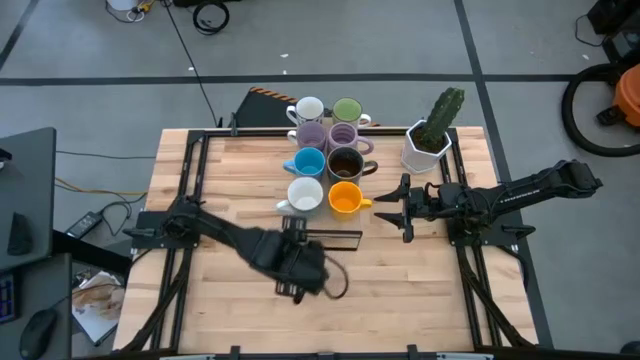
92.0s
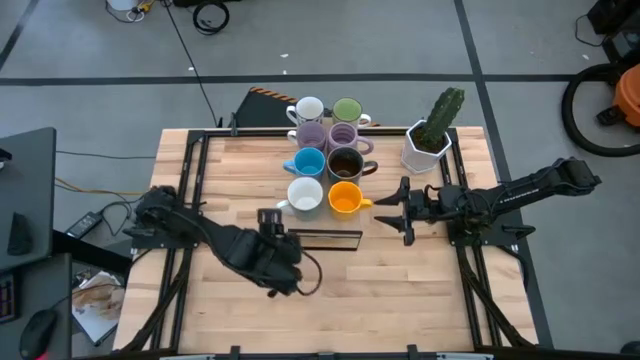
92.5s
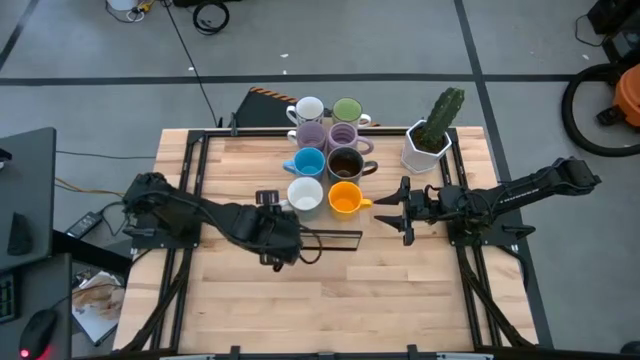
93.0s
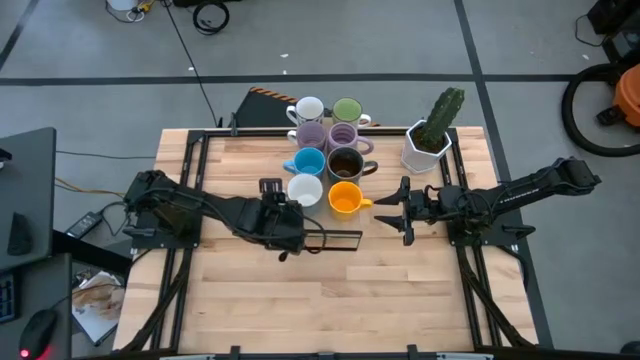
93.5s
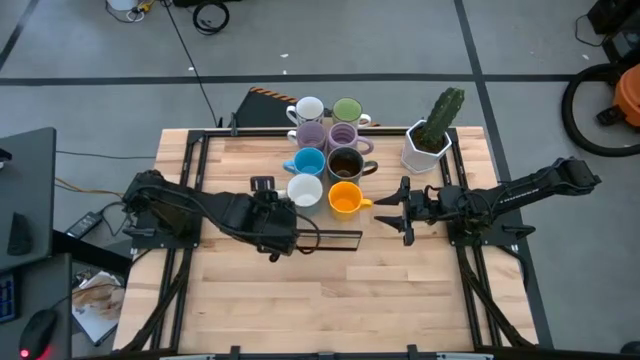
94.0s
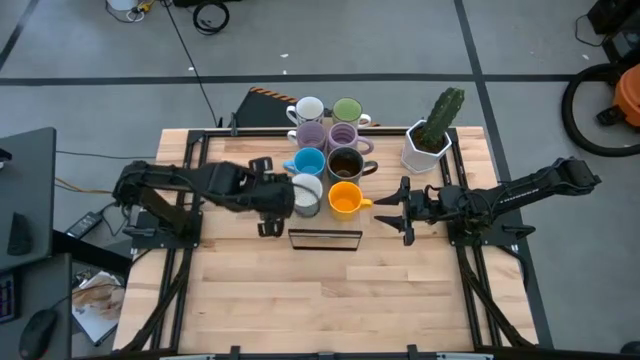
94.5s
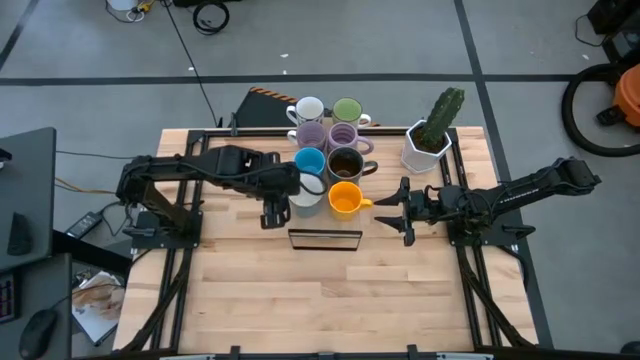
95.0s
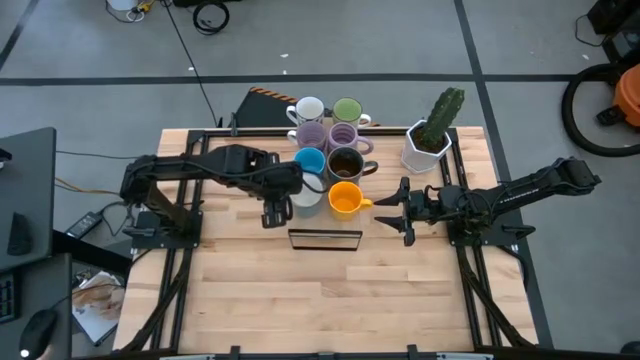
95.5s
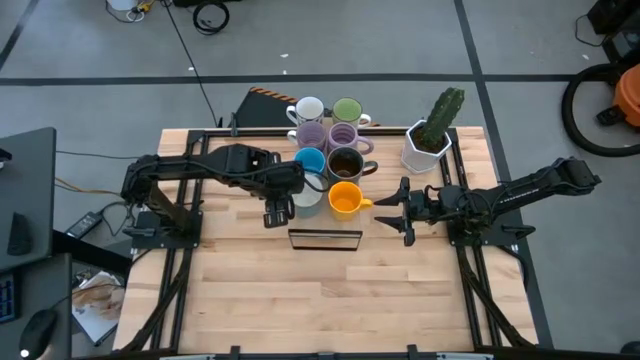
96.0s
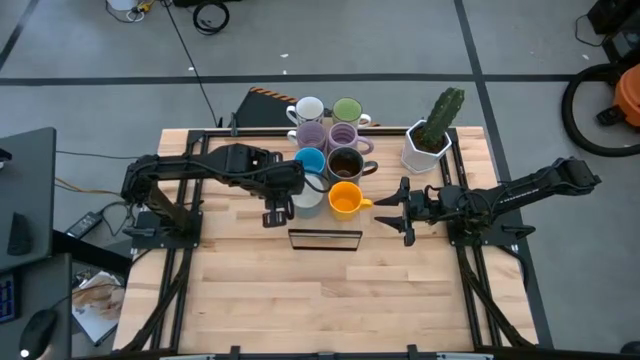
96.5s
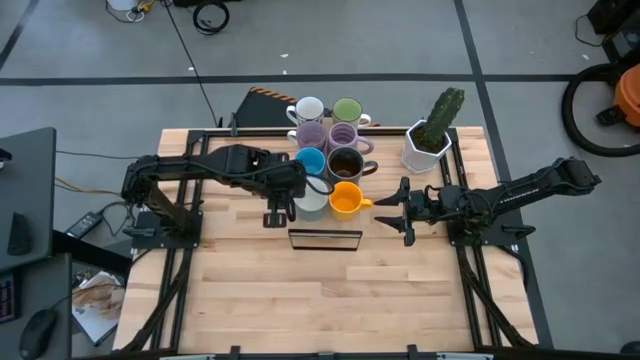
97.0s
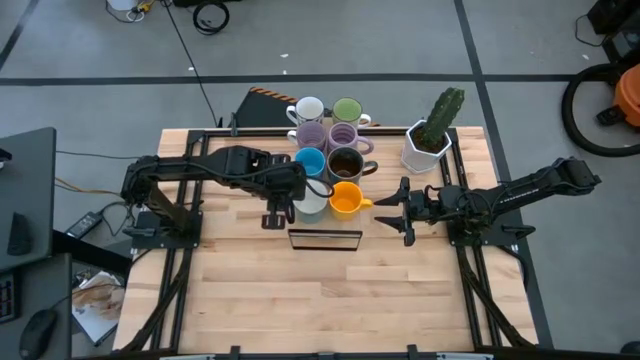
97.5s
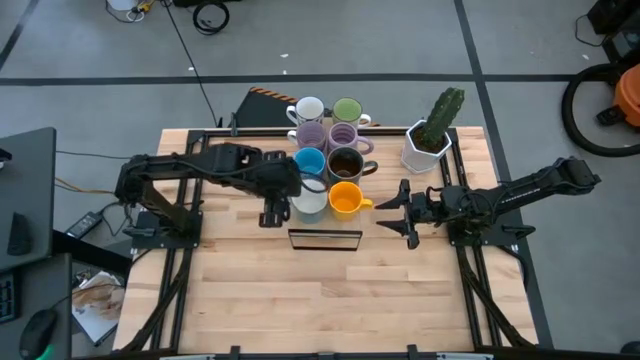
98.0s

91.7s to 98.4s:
Task: Place coffee mugs
Adjust the light green mug on the shelf

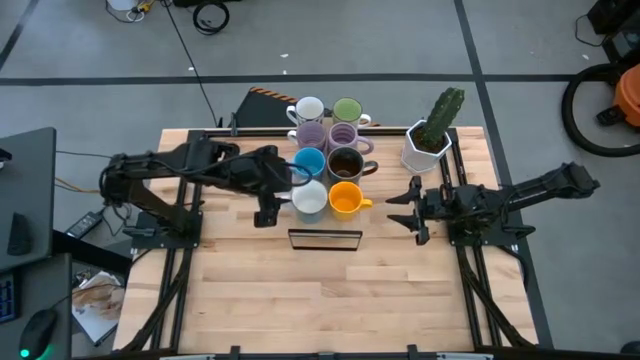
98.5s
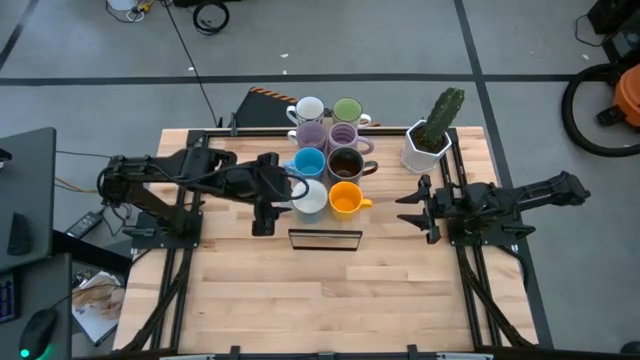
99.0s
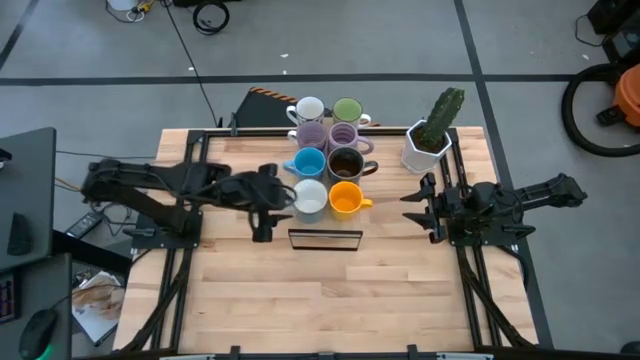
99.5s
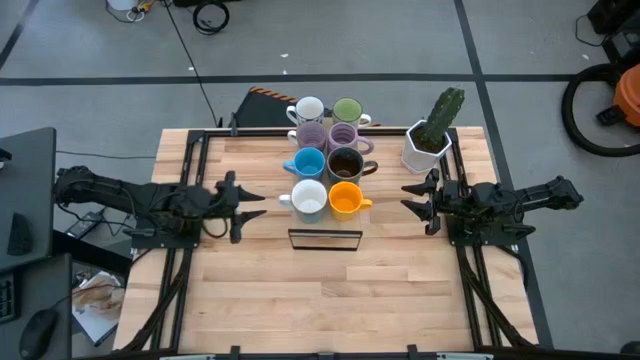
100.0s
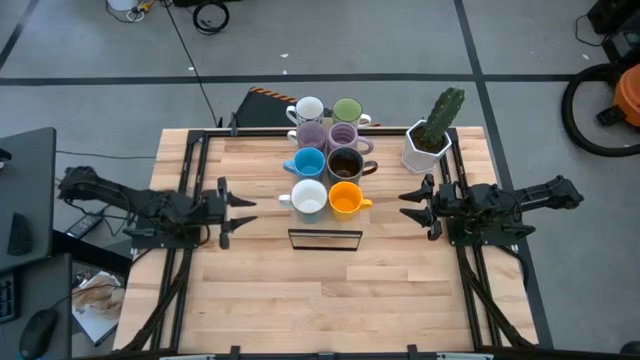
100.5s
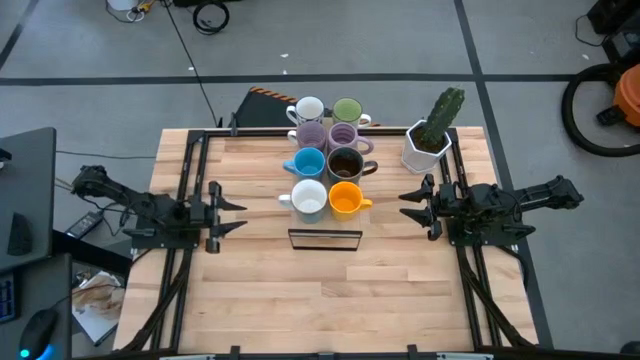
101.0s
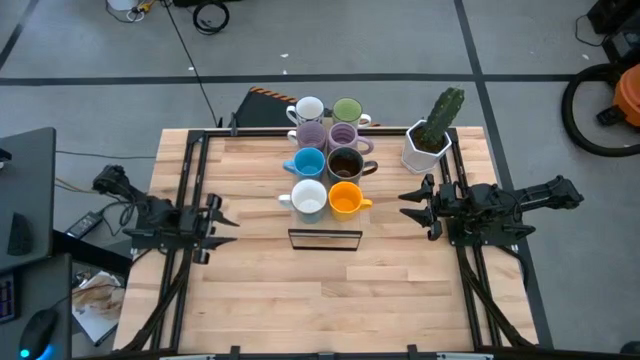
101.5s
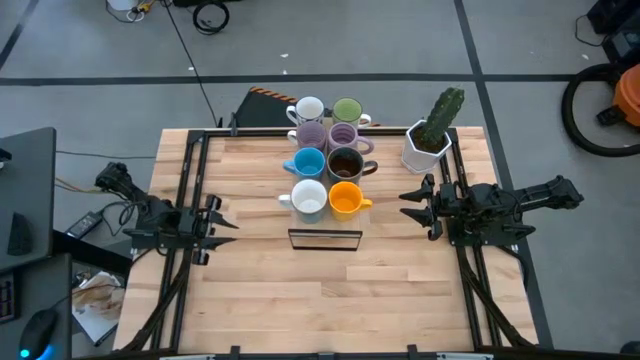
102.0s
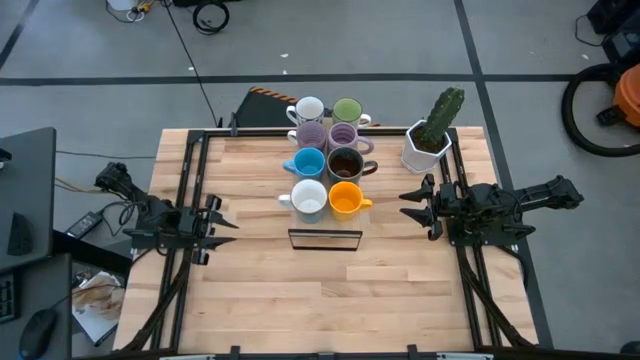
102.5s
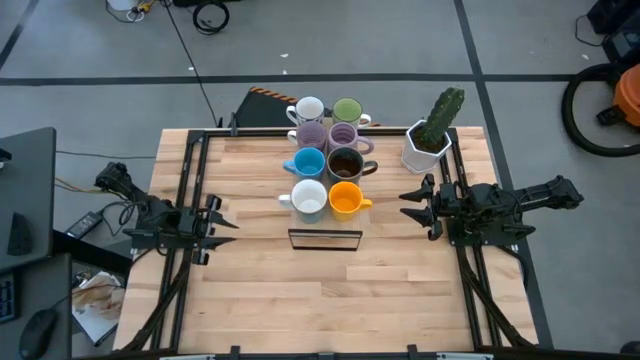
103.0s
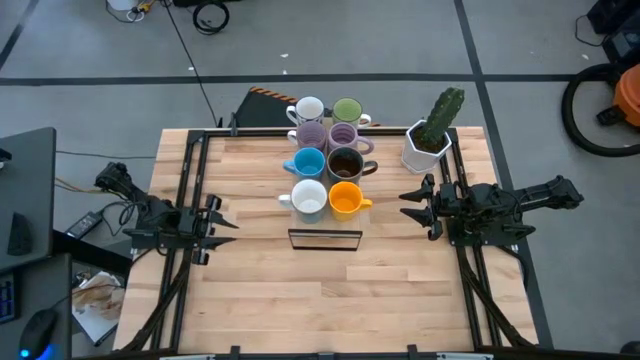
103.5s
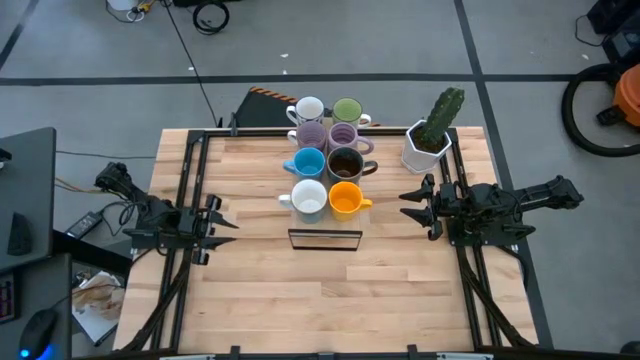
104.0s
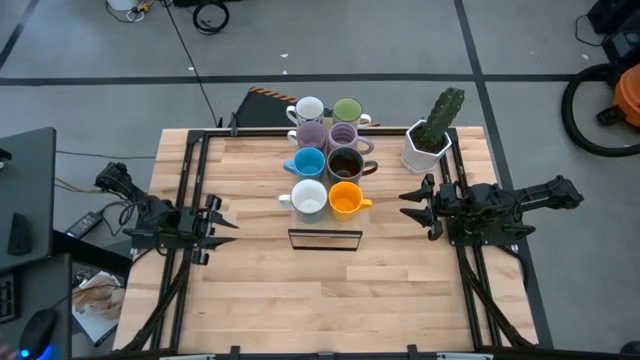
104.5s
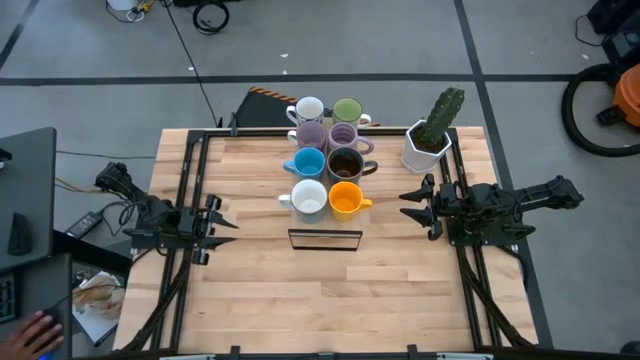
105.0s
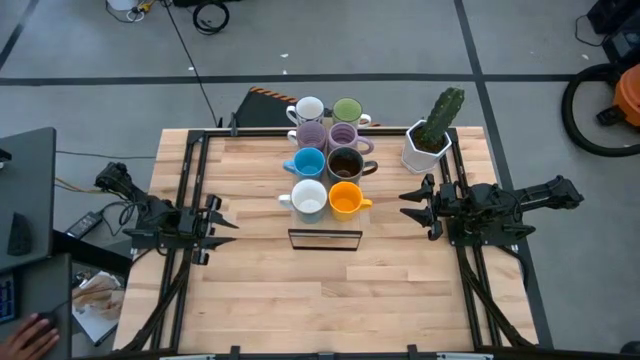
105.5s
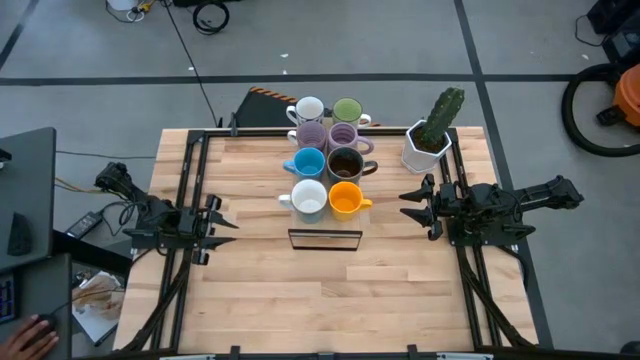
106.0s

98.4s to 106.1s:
Return to Home Position

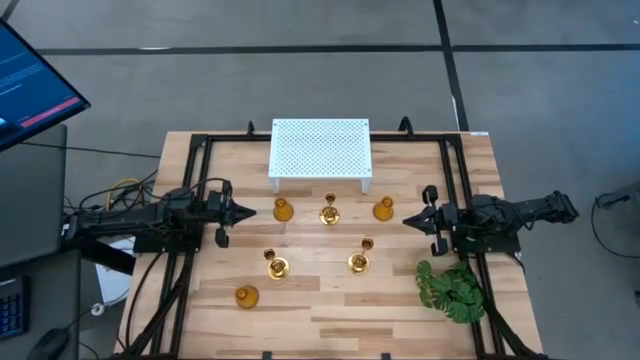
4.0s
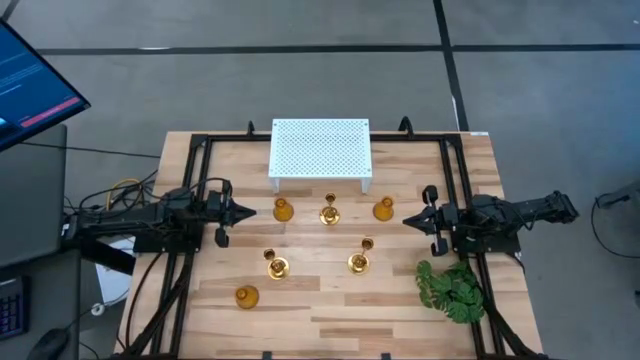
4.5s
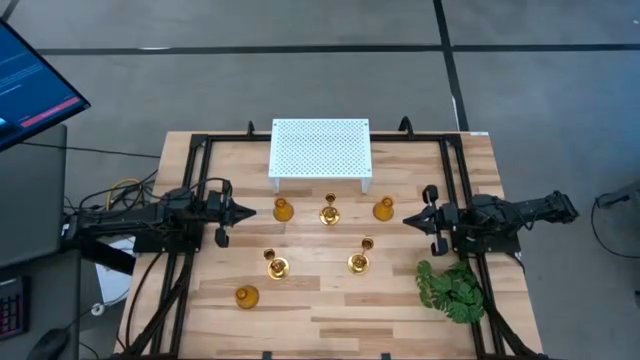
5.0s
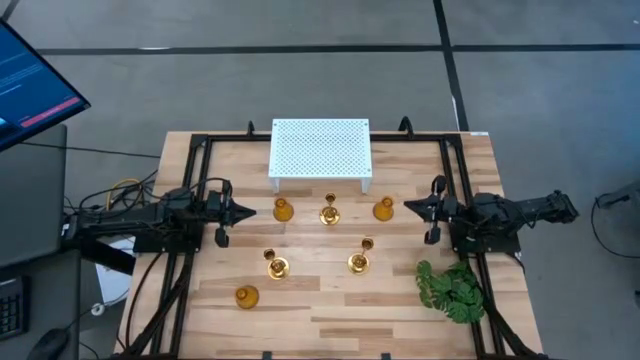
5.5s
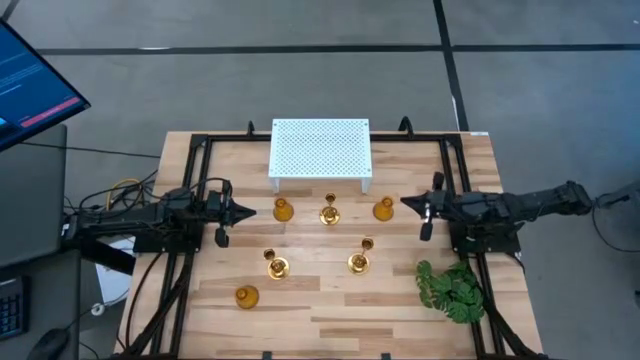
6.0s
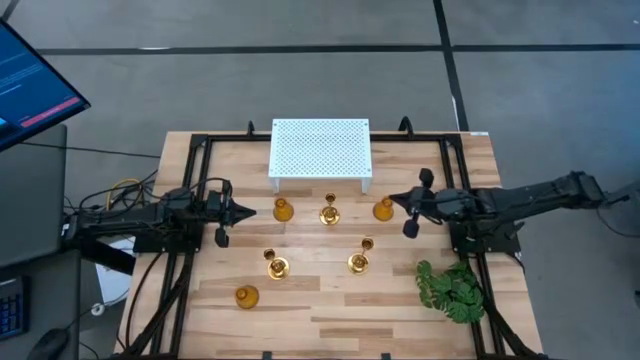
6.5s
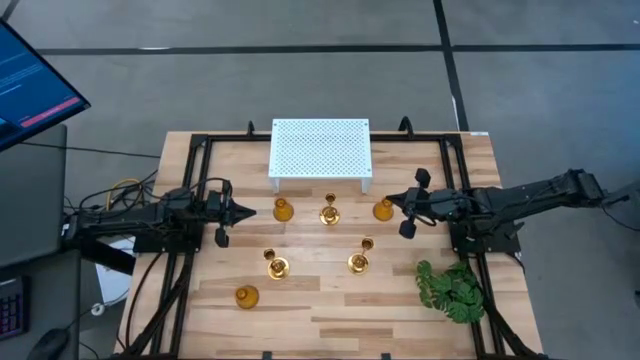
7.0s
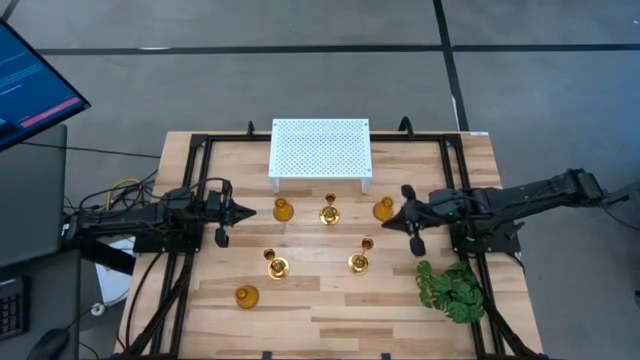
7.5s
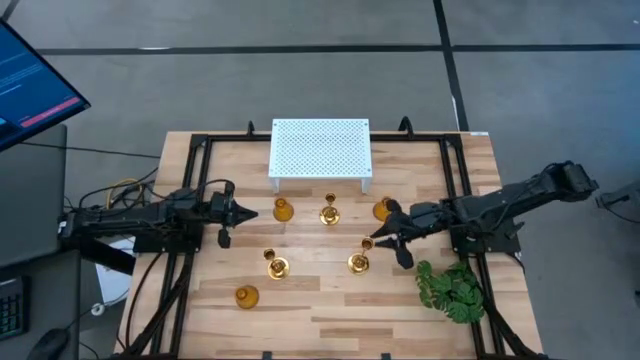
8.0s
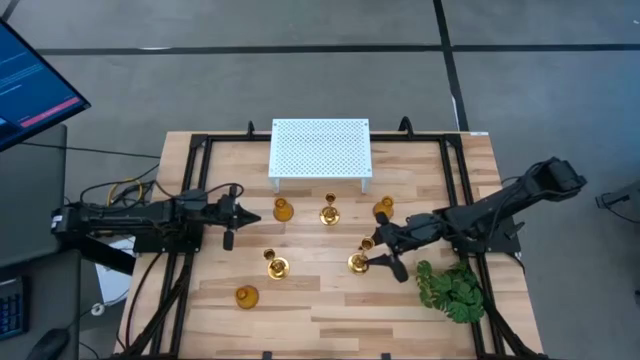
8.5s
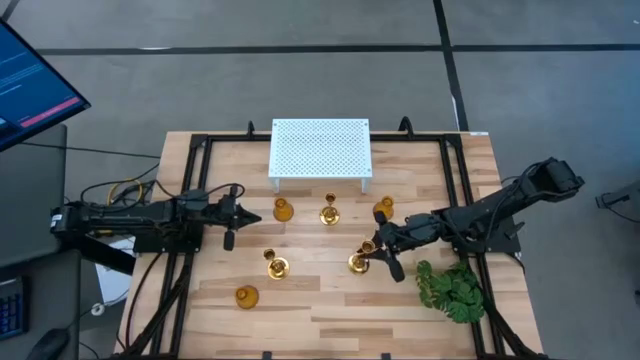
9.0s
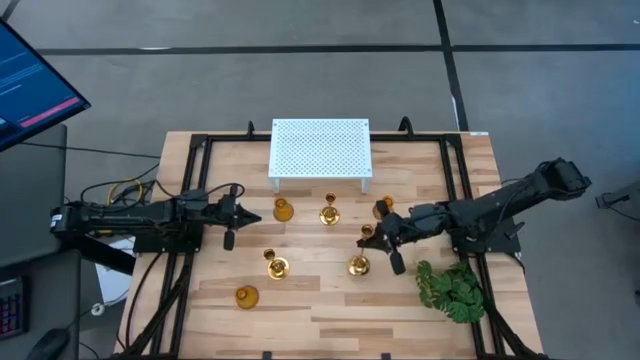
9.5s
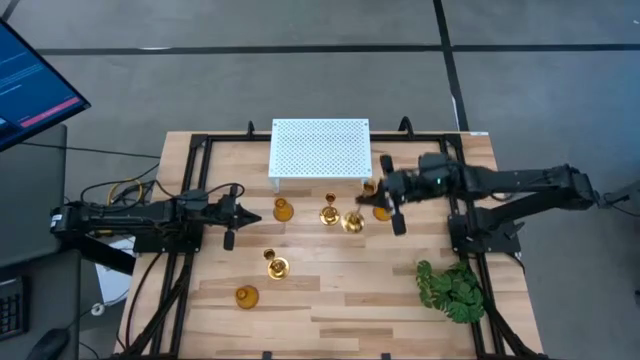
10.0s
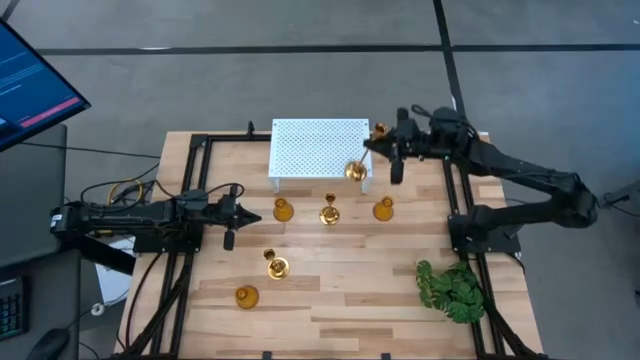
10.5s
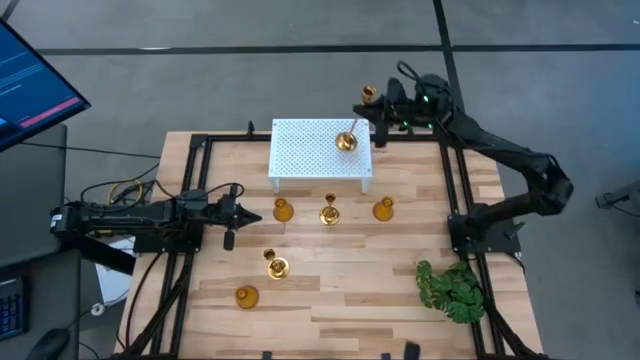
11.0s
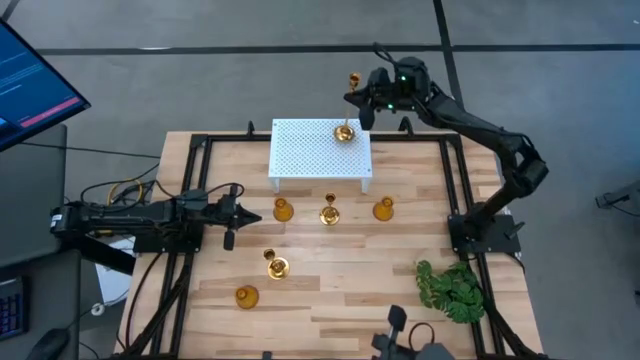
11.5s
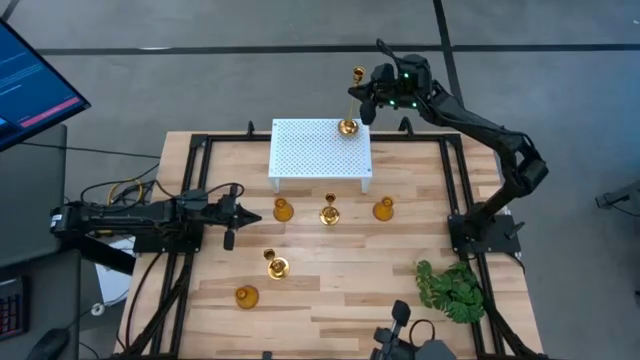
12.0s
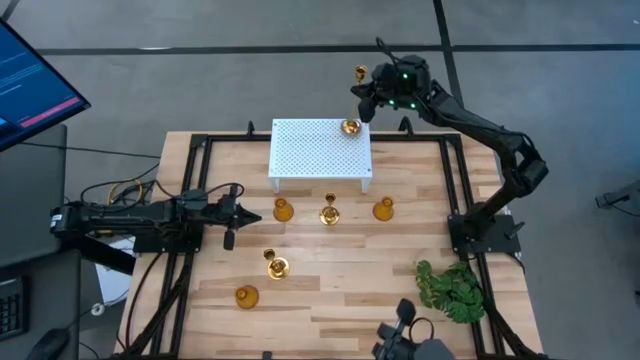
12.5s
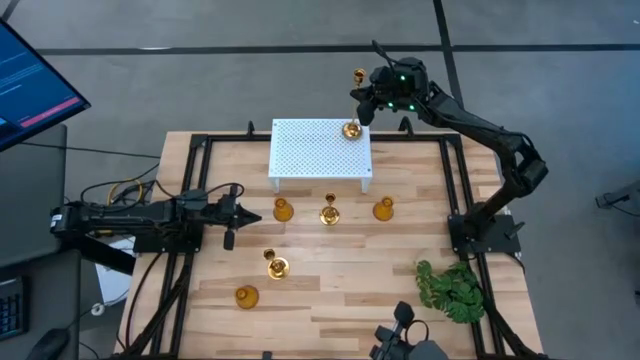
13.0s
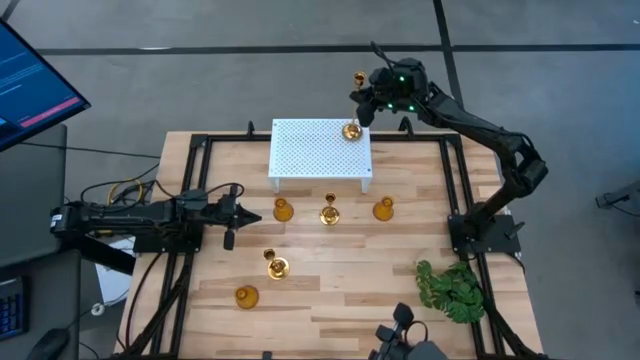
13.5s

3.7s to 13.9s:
Task: Pick & Place candle stick holders
Put the large gold candle holder on the shelf
